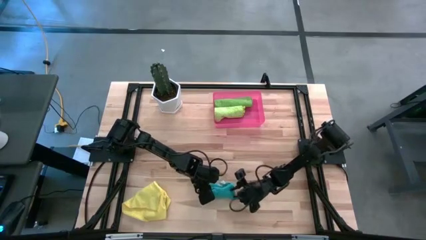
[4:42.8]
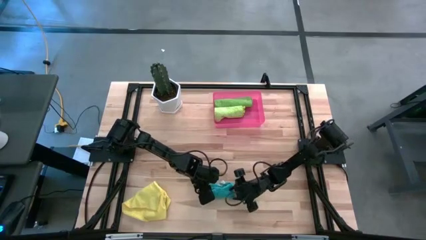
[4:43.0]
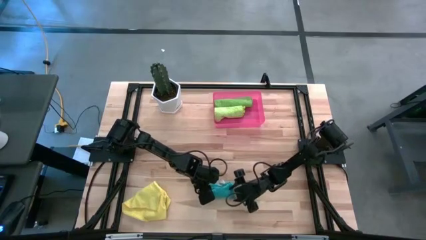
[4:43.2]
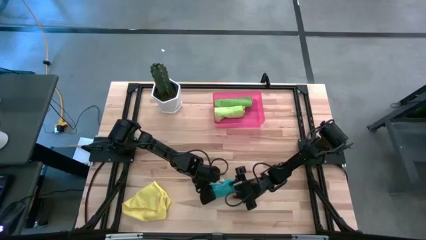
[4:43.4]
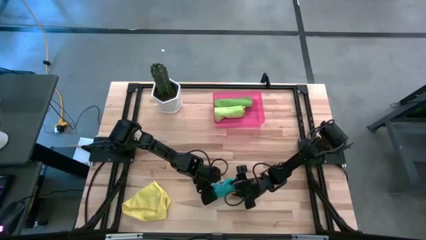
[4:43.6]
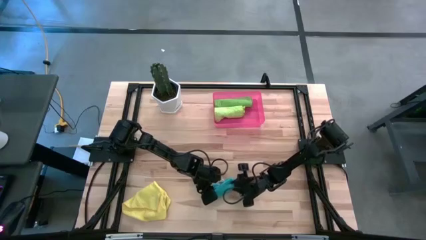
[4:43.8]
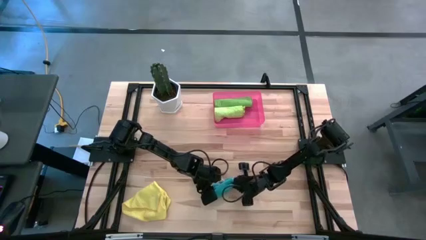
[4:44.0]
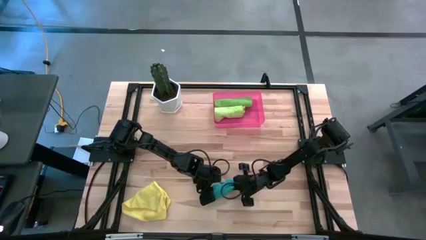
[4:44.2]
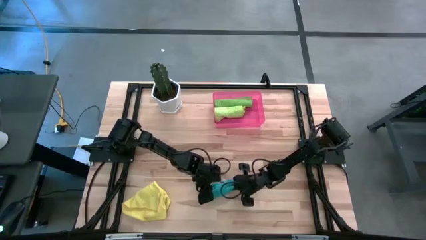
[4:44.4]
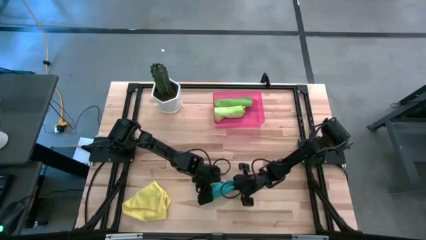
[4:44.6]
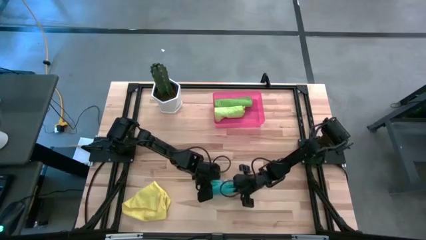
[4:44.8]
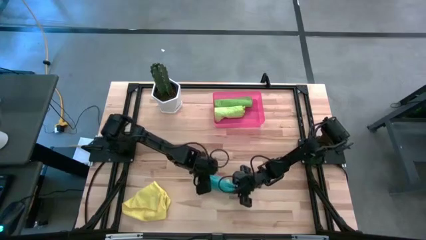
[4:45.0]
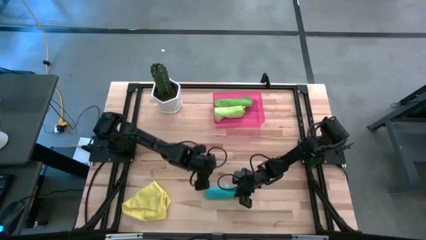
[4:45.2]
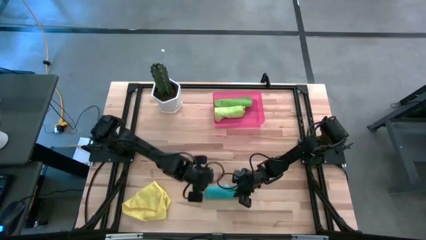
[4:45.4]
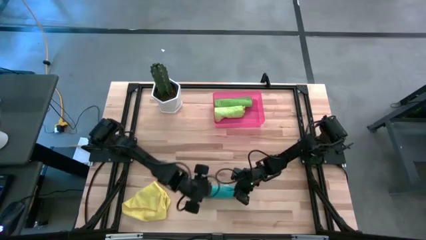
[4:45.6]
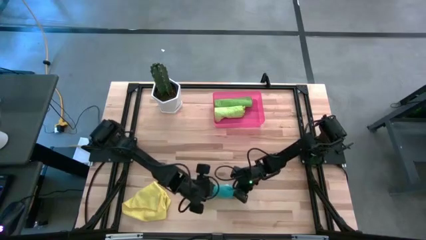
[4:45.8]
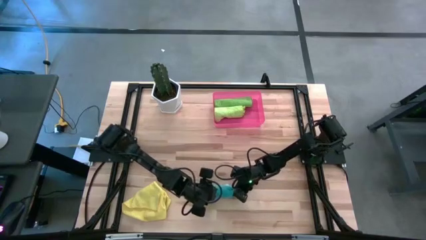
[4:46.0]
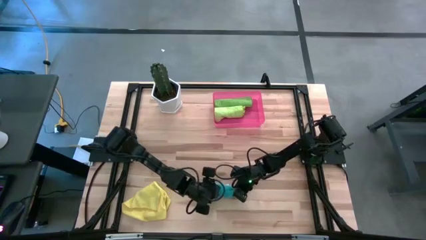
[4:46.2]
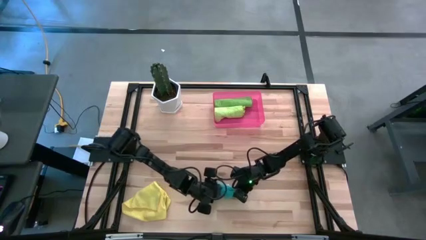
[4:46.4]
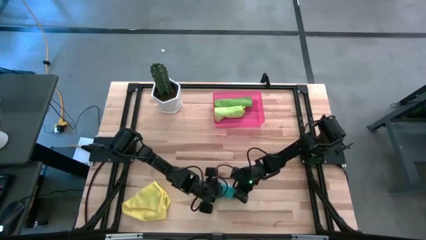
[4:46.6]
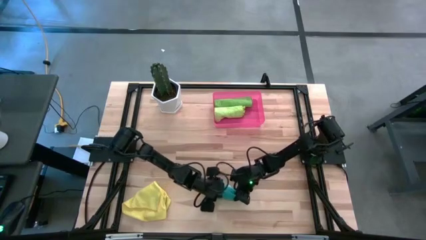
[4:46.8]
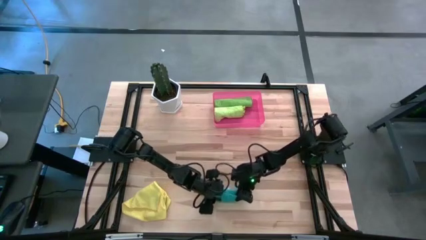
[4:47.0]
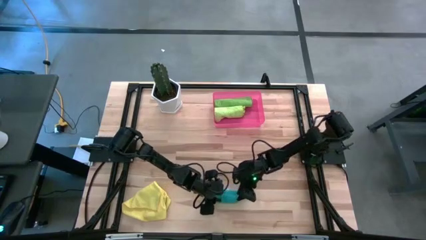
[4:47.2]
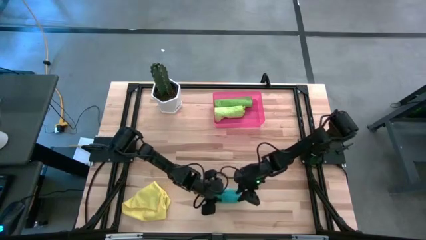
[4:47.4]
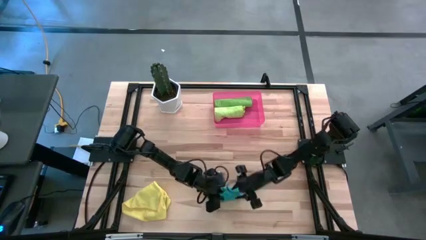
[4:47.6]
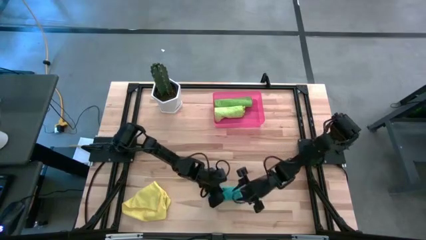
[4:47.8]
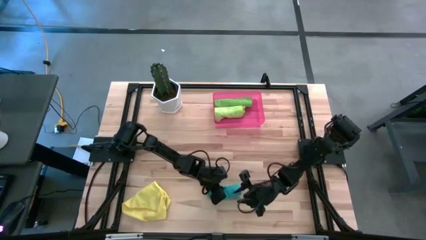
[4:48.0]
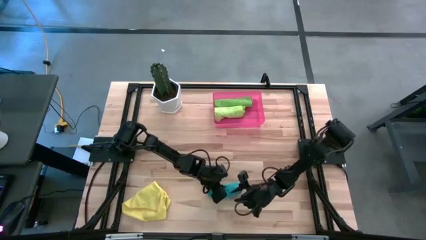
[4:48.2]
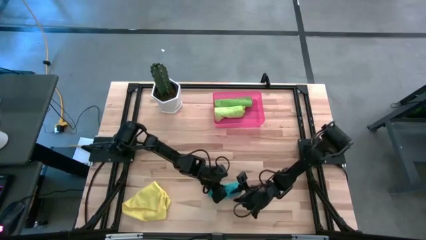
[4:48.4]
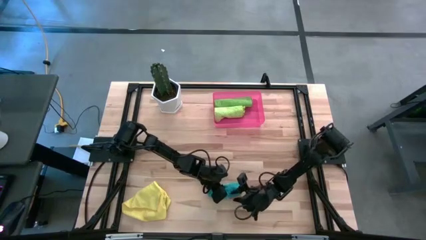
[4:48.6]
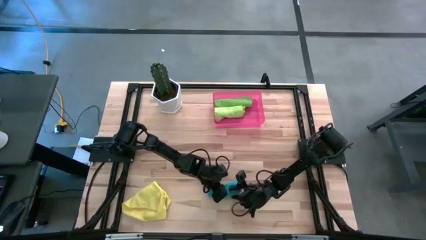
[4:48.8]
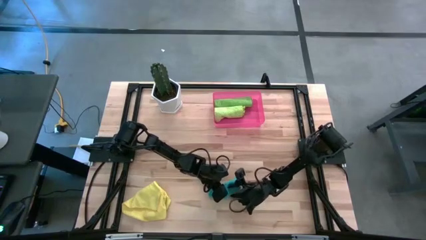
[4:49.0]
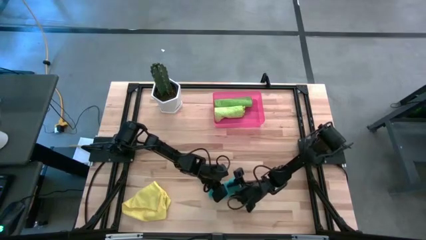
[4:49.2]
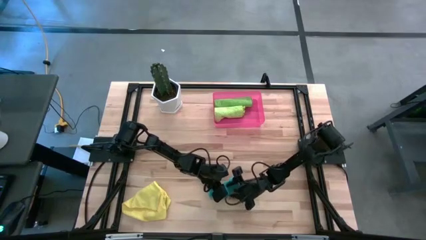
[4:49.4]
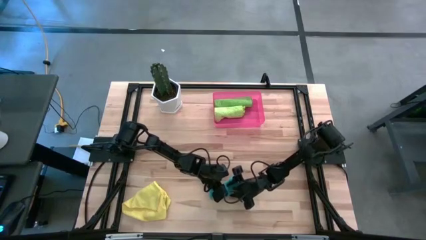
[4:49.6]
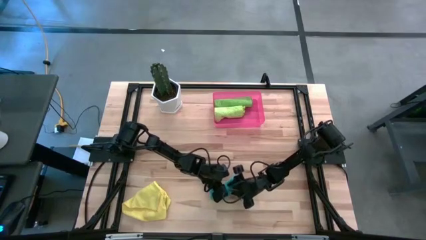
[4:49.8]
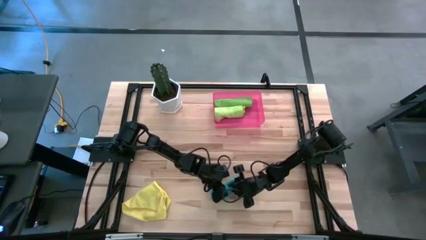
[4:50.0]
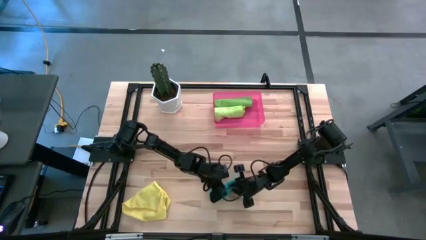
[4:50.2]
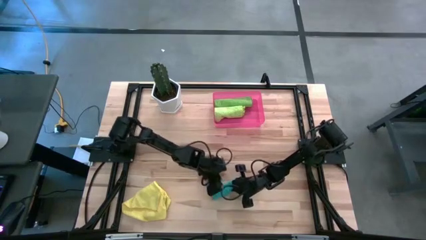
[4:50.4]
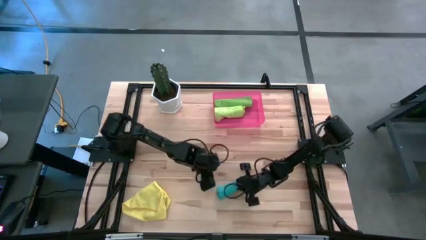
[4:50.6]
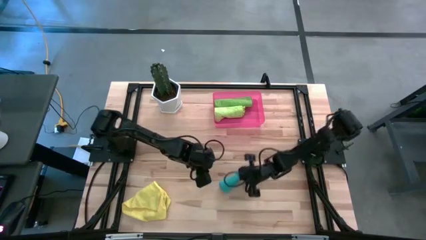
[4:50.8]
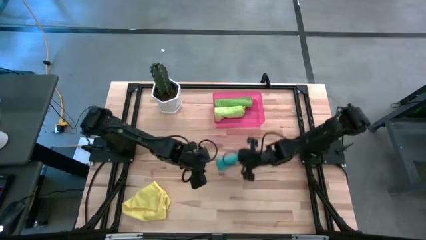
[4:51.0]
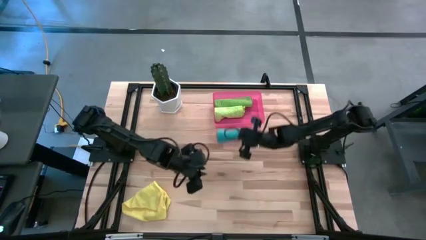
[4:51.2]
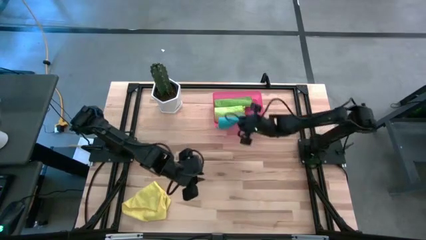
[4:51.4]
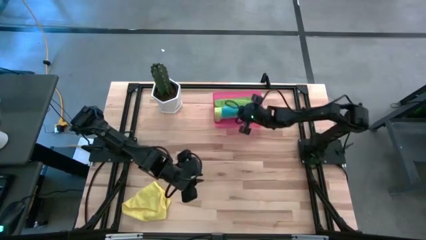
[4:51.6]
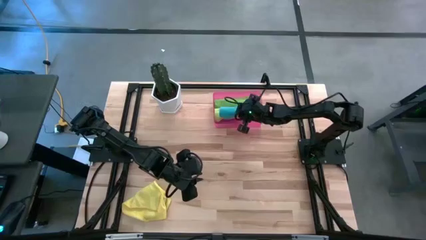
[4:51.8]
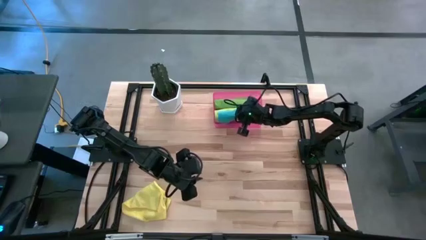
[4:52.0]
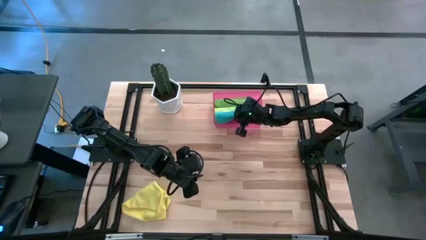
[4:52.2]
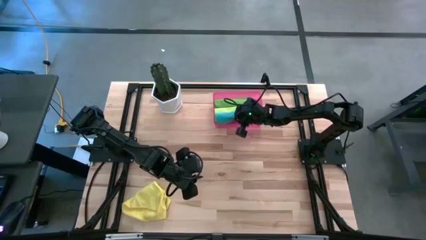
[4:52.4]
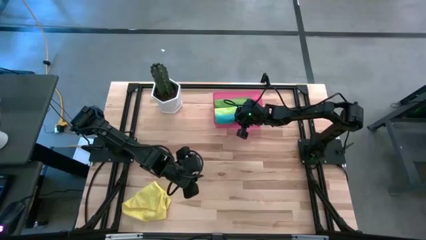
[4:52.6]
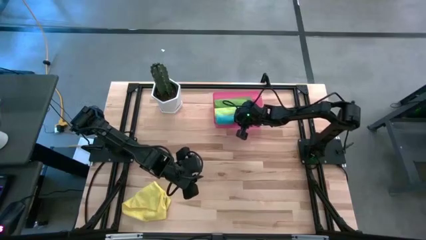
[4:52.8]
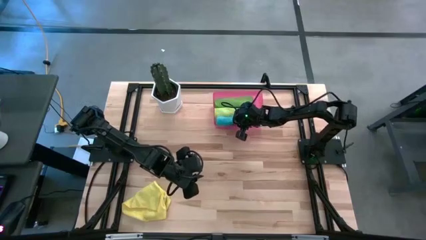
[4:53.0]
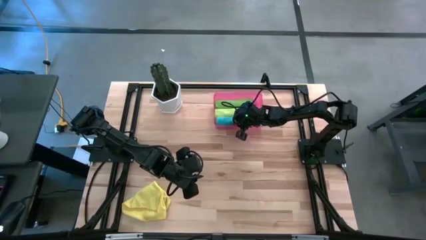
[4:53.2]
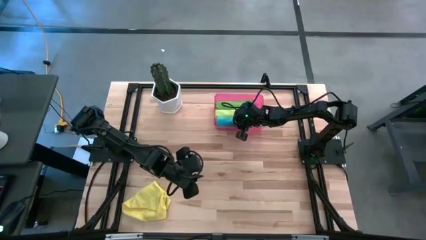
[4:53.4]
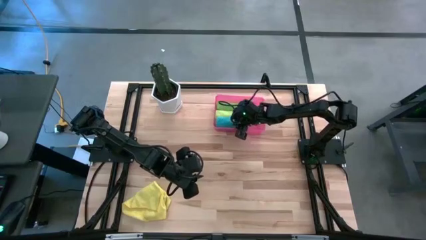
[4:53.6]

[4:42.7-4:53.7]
Task: Roll microfiber towels into tight, uniform cylinder then place into a basket
Put the blue microfiber cloth into the pink bin

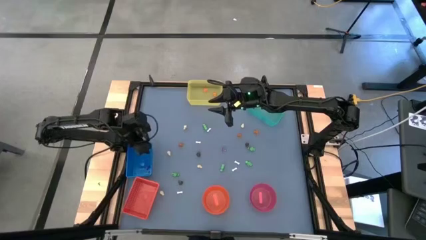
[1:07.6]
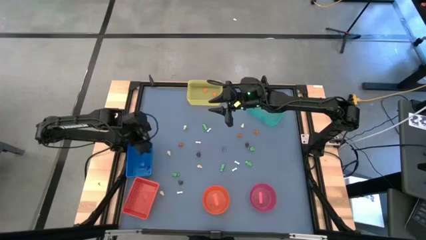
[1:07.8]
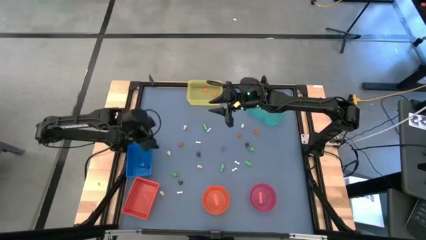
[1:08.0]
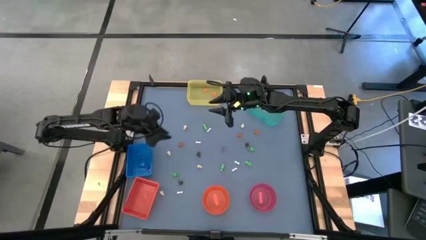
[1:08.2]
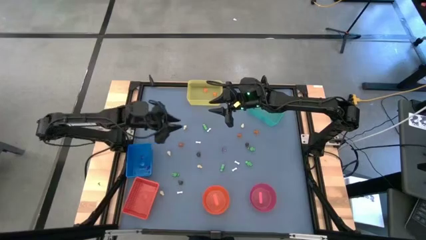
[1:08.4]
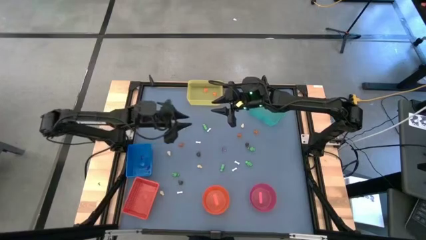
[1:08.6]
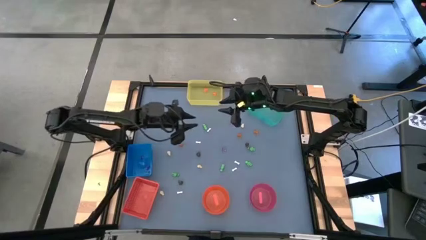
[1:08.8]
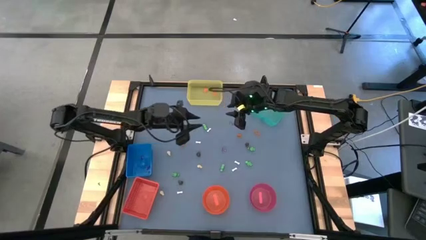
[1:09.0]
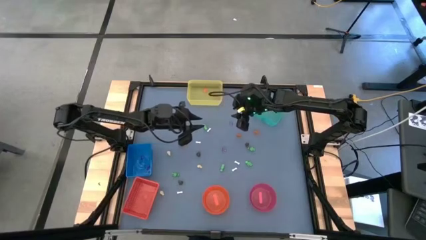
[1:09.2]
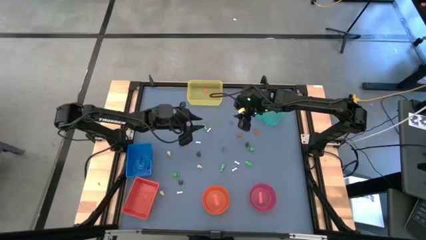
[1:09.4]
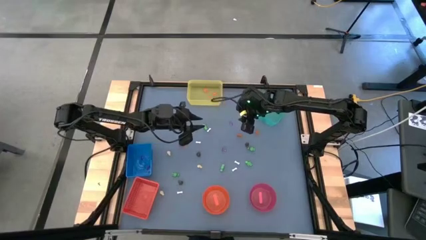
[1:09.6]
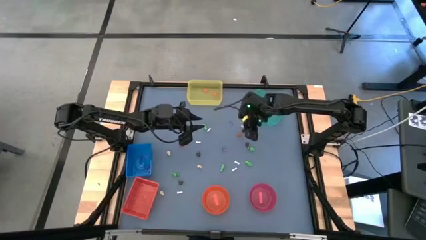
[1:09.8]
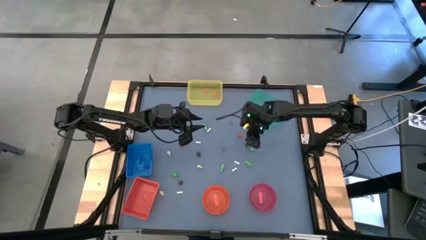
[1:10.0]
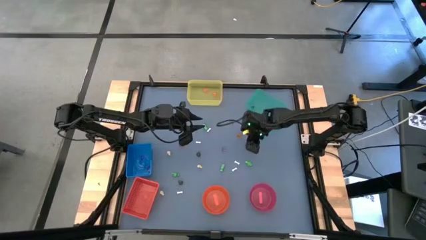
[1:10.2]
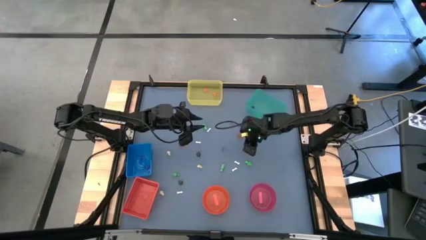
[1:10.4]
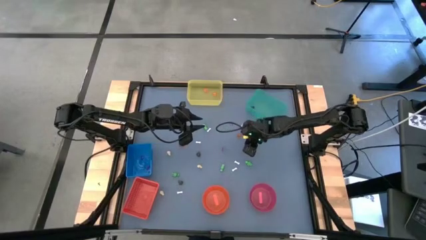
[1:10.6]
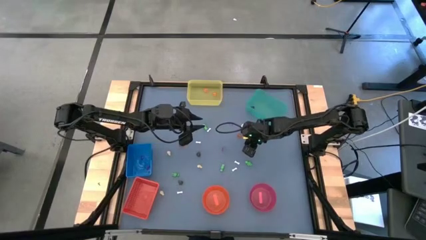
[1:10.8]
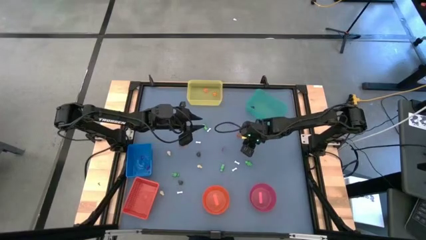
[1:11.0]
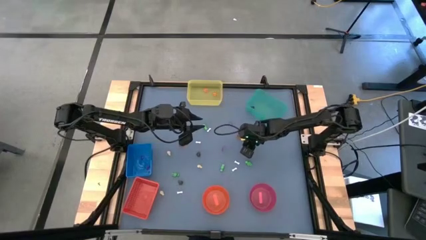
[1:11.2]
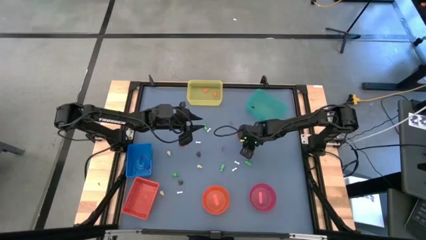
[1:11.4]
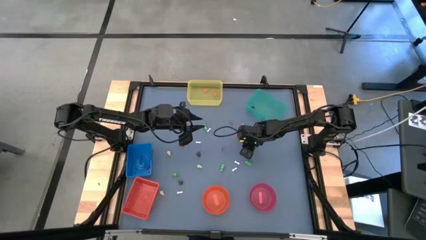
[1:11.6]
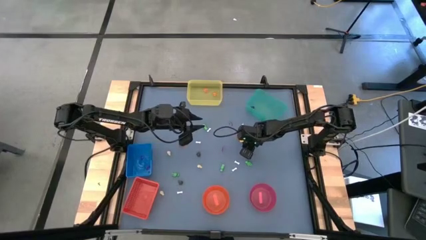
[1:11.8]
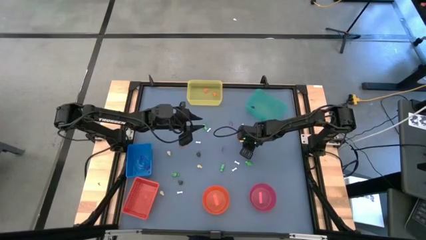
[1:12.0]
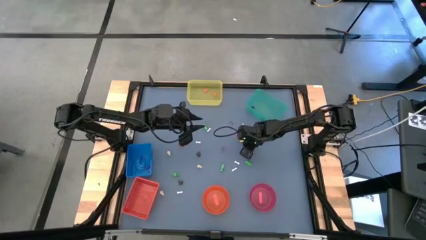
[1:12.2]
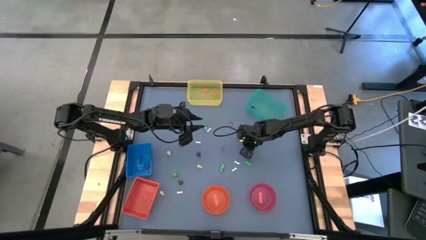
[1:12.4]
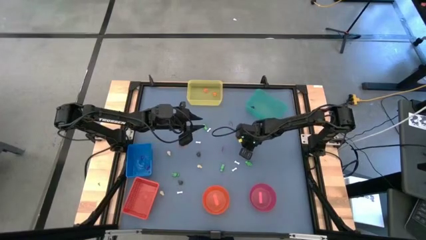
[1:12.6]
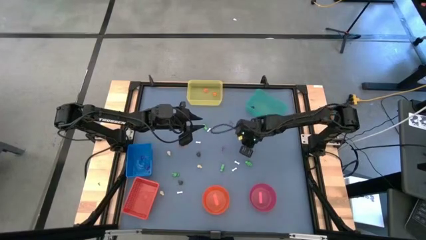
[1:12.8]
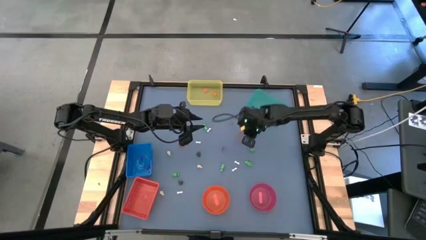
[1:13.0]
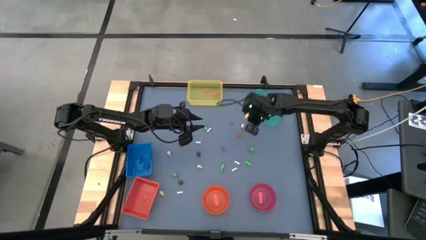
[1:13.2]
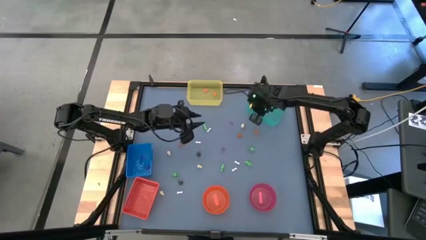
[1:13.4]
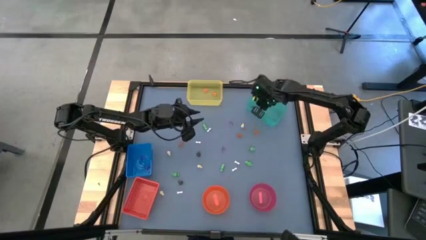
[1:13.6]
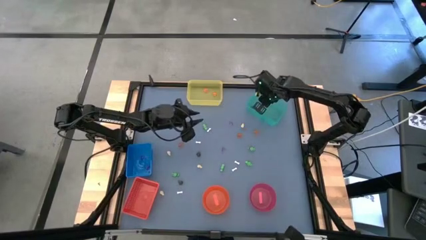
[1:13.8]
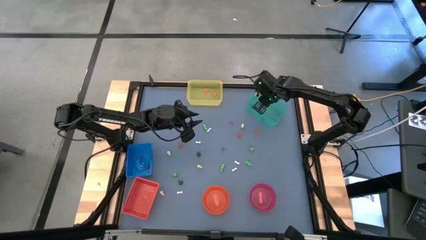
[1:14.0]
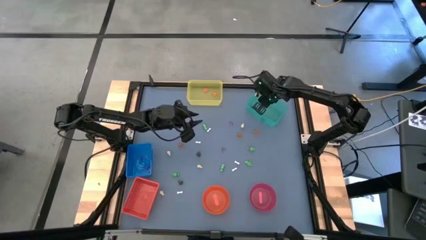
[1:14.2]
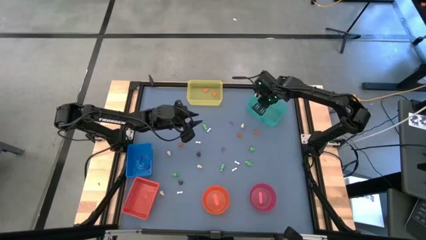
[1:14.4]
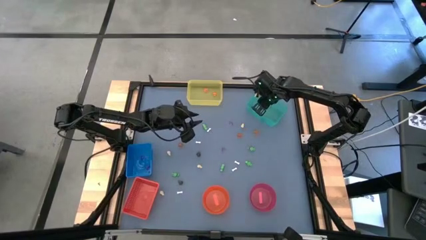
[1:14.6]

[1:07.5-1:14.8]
Task: Sort Halloween decoration
Put the black skull toy into the light blue bin
